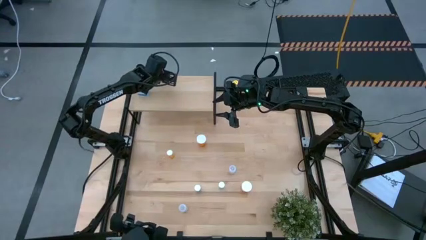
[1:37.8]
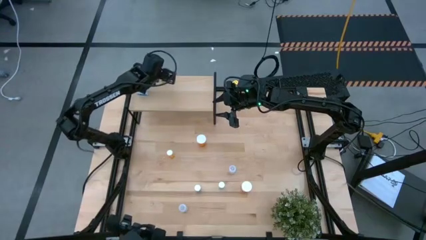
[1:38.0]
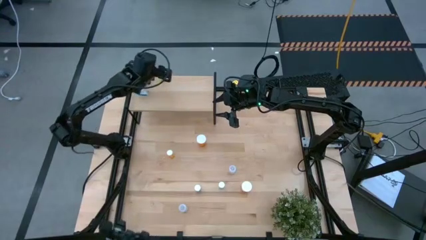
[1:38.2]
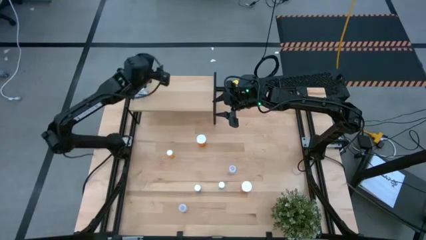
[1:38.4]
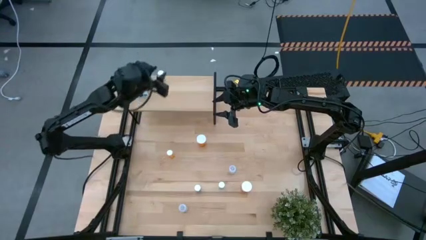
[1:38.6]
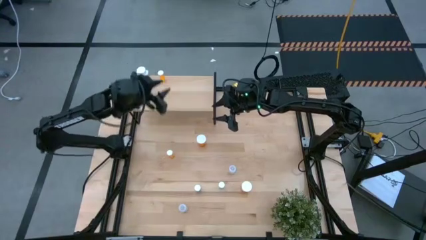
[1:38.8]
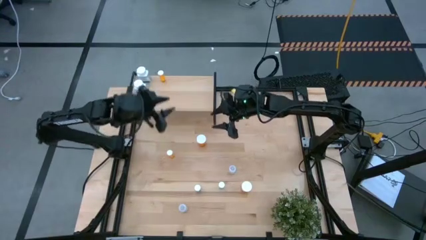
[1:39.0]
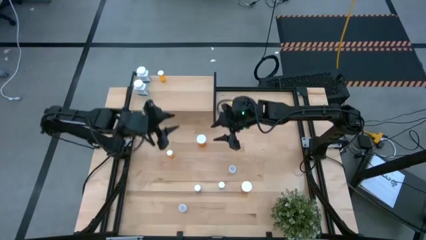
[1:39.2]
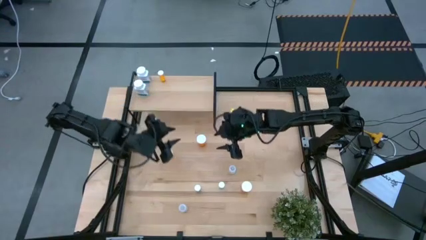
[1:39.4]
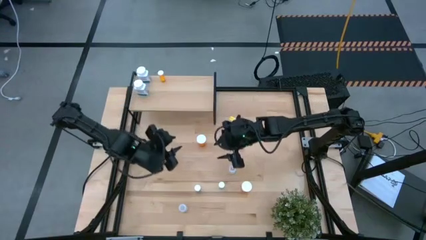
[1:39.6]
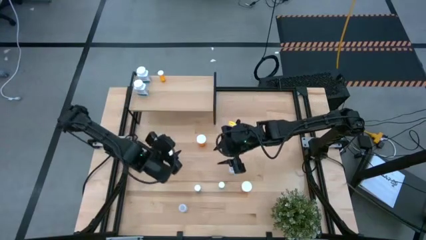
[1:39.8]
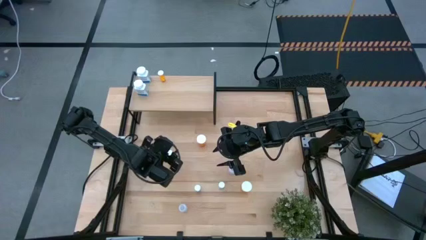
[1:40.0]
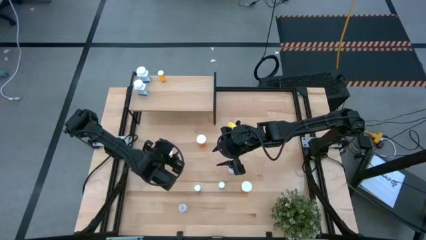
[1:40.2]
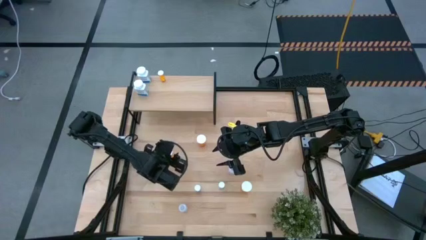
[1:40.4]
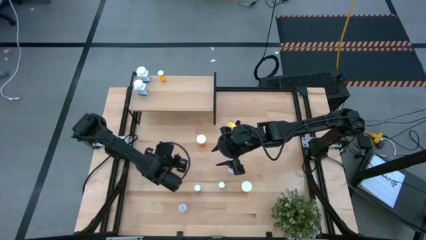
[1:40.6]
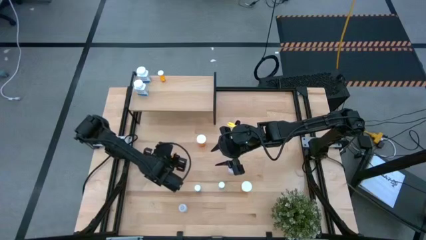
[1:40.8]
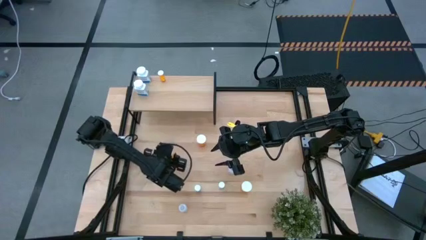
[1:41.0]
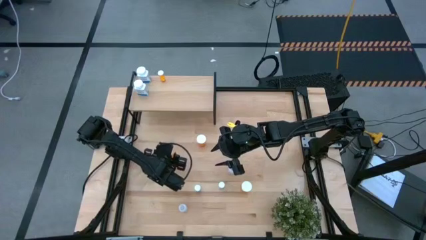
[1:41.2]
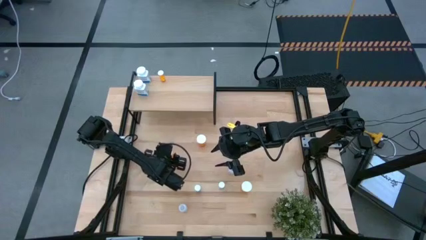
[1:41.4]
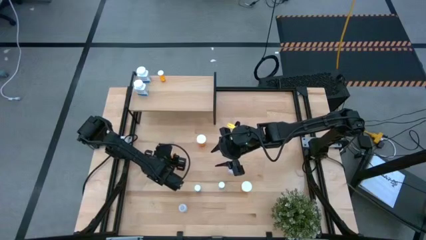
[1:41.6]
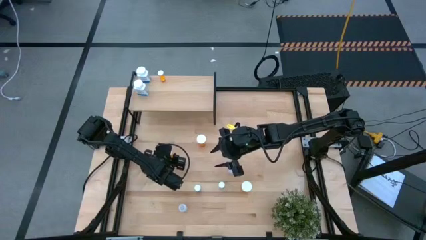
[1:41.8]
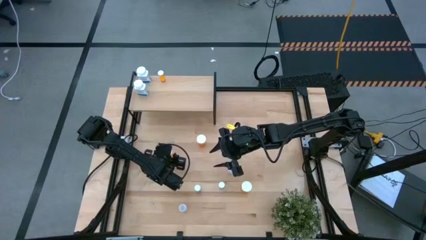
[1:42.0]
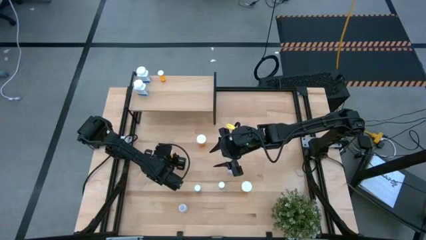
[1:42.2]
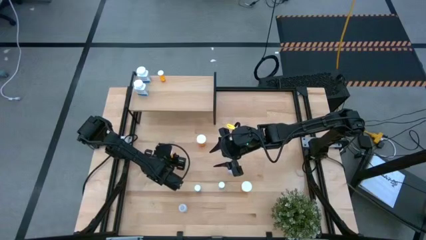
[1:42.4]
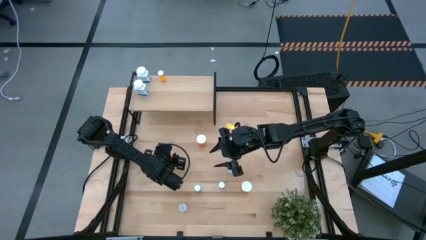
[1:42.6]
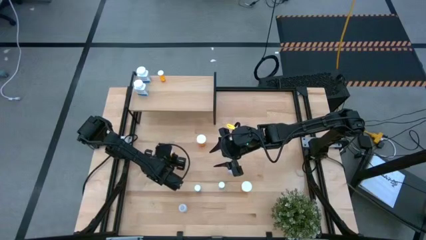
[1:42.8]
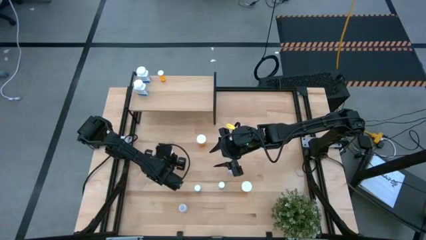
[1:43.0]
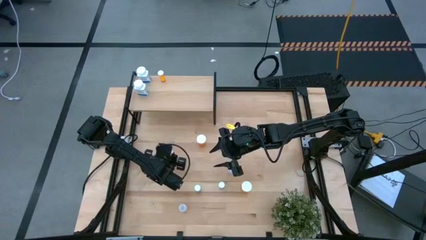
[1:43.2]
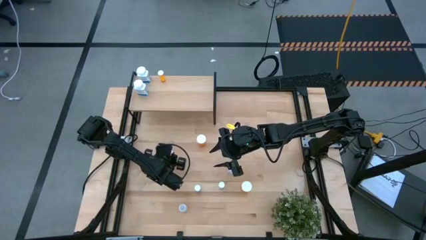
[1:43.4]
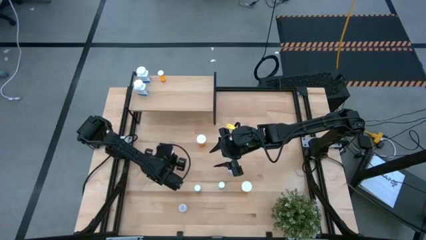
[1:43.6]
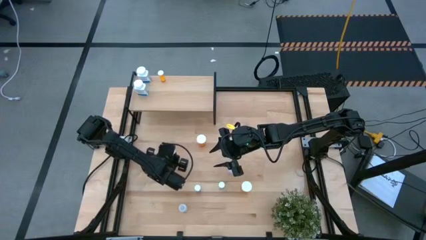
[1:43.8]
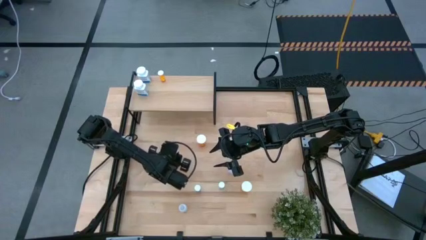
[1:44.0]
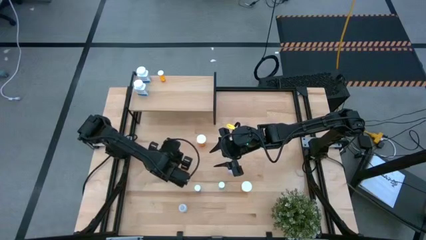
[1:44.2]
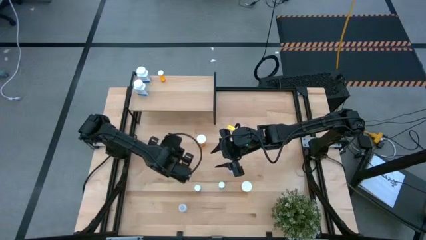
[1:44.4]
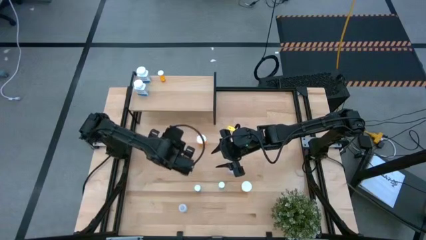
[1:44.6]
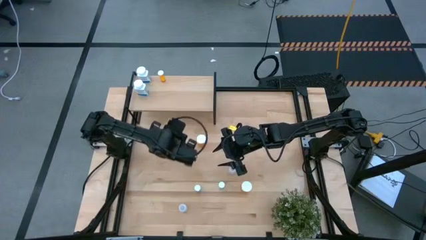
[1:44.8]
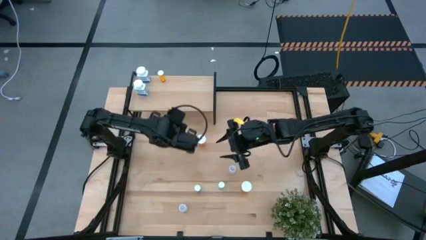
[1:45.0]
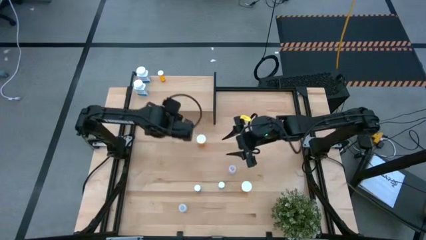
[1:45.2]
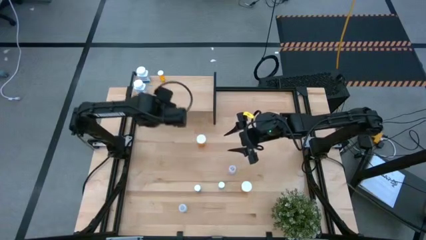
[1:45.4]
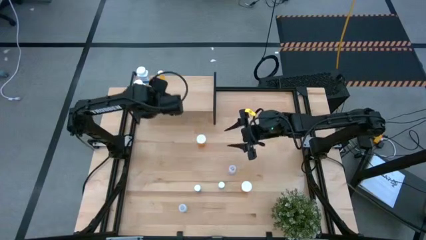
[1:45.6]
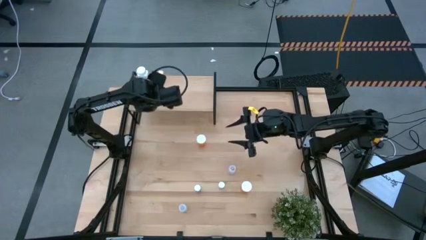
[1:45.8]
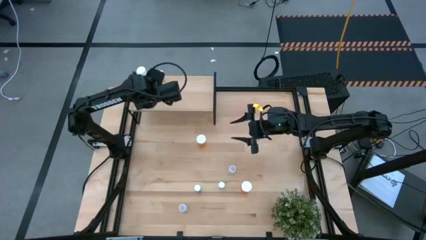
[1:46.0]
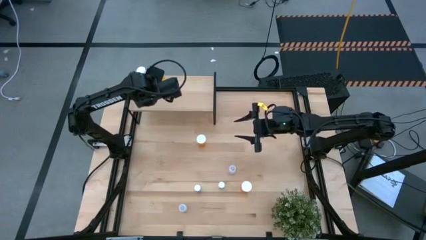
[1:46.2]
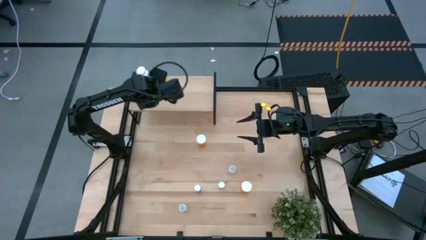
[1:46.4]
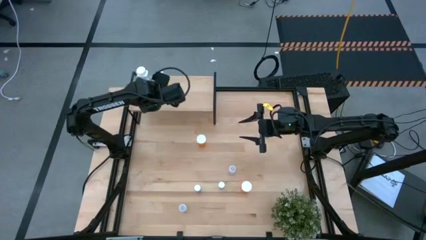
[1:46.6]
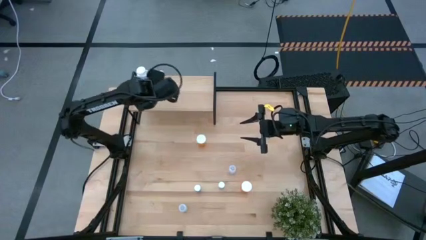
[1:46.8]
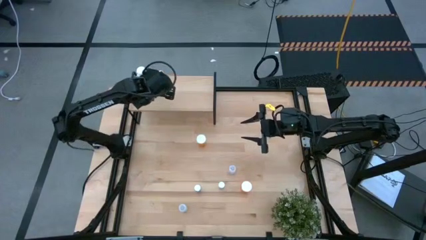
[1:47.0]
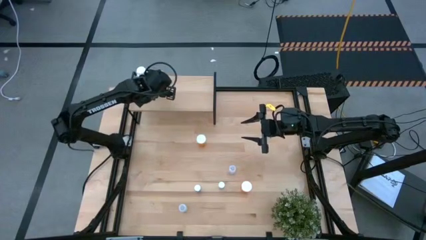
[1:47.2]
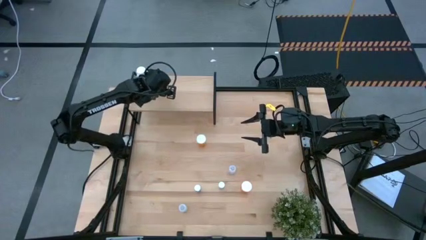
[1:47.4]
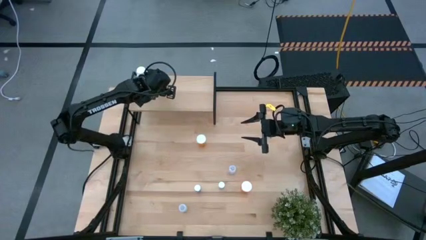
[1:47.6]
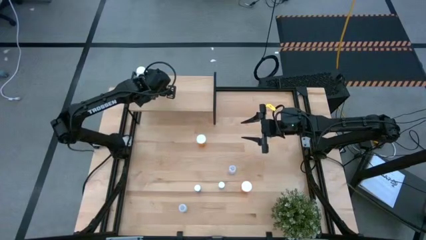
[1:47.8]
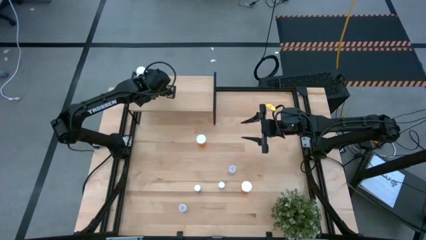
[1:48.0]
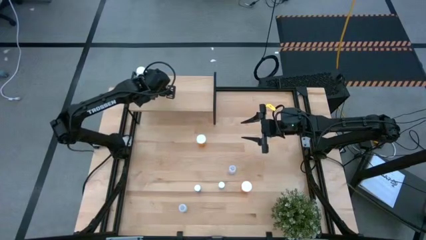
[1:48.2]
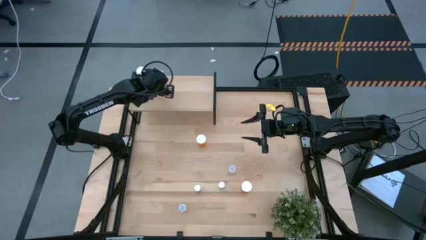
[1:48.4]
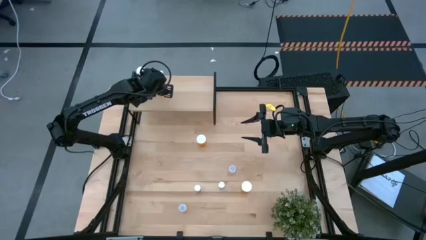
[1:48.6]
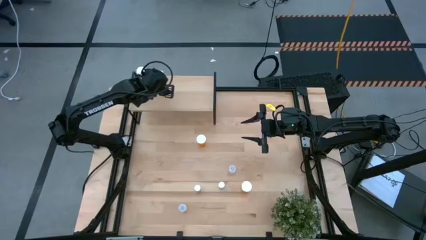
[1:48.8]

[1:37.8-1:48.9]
Task: Pick and place medicine bottles onto shelf by color
Put the small orange pill bottle on the shelf aligned with the other small orange pill bottle

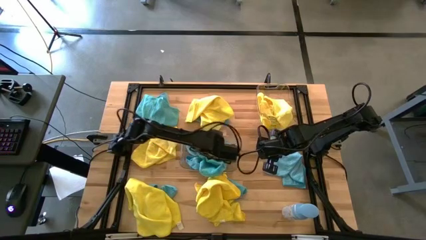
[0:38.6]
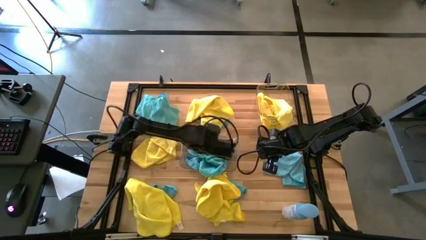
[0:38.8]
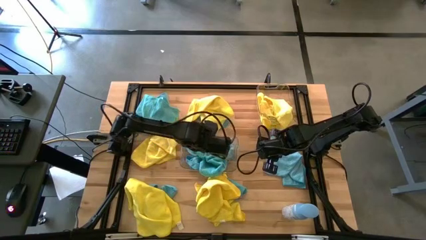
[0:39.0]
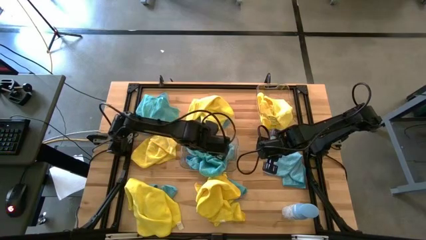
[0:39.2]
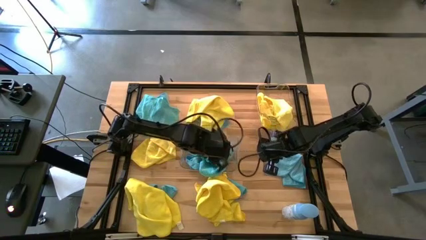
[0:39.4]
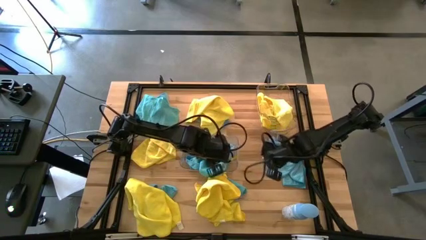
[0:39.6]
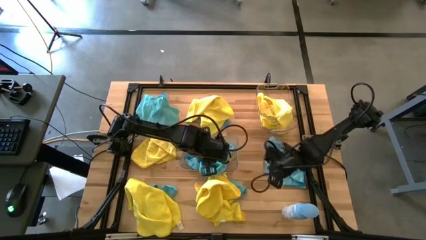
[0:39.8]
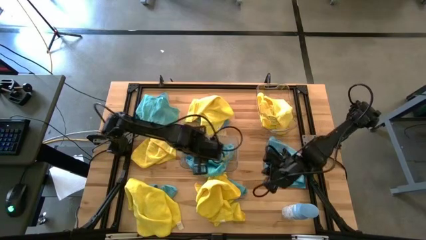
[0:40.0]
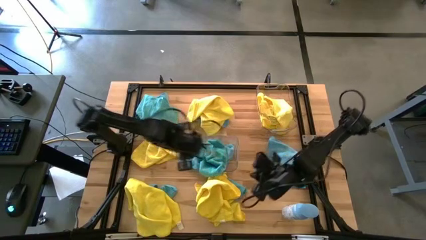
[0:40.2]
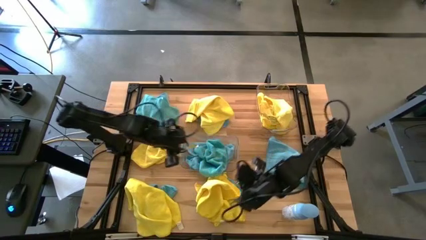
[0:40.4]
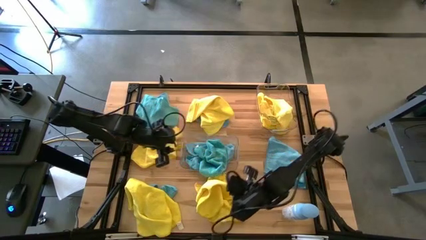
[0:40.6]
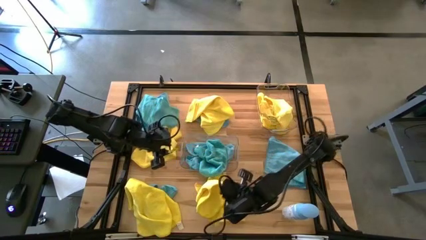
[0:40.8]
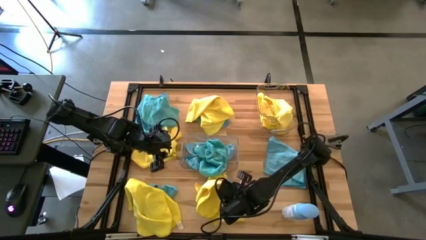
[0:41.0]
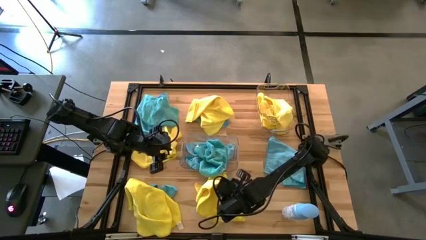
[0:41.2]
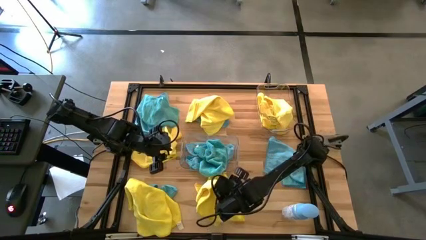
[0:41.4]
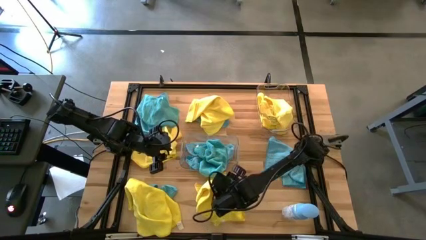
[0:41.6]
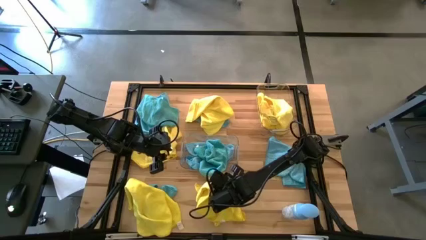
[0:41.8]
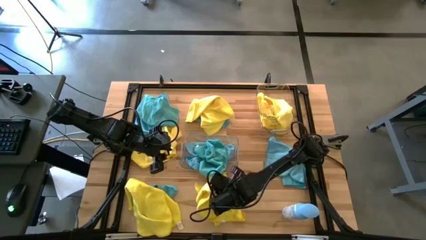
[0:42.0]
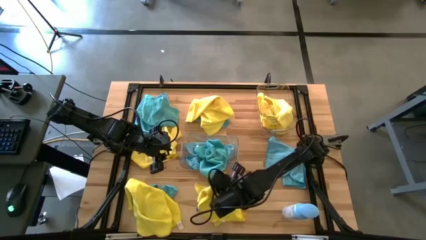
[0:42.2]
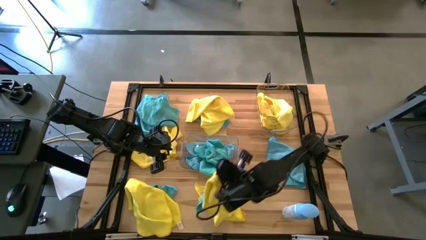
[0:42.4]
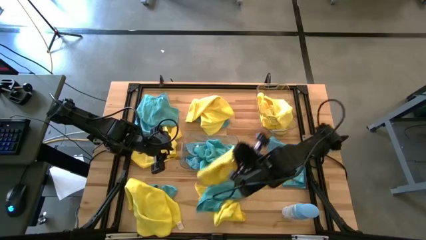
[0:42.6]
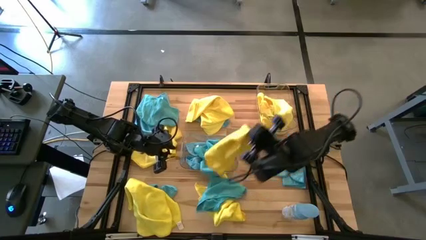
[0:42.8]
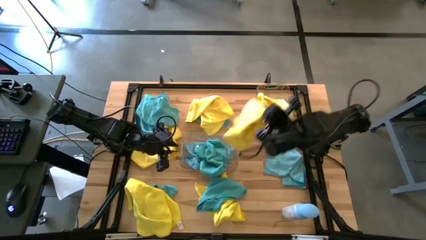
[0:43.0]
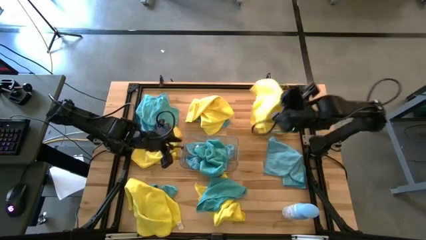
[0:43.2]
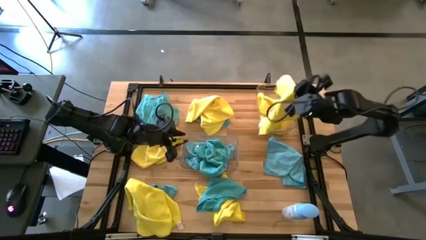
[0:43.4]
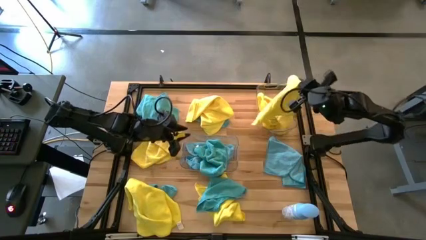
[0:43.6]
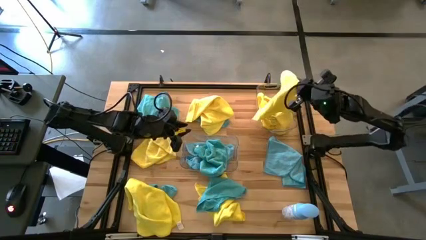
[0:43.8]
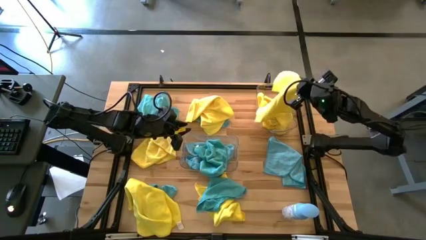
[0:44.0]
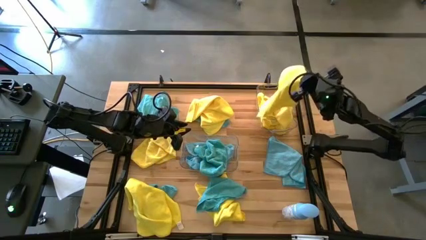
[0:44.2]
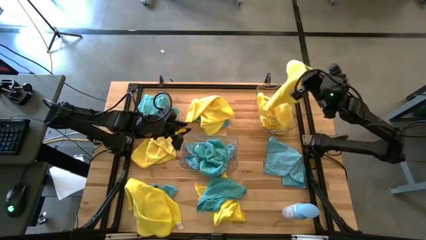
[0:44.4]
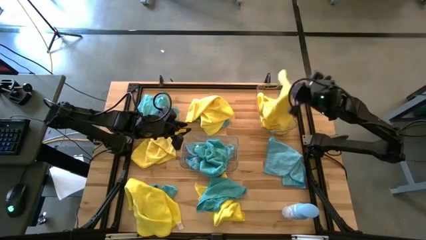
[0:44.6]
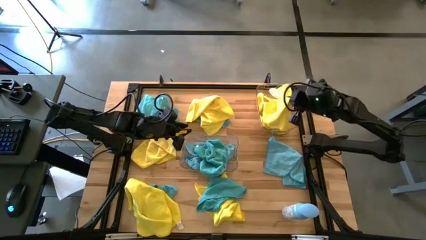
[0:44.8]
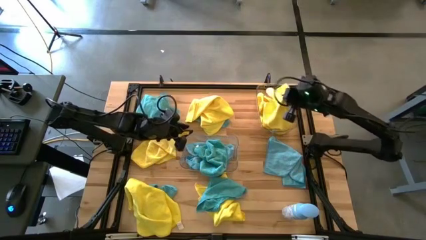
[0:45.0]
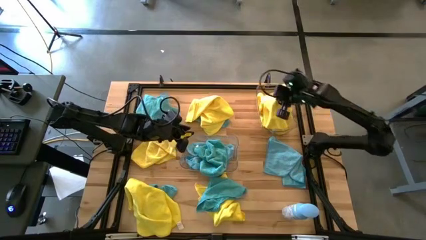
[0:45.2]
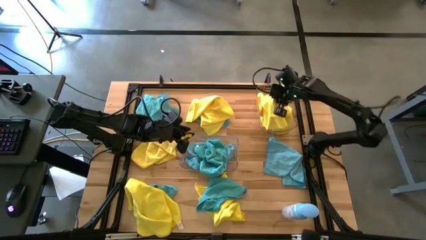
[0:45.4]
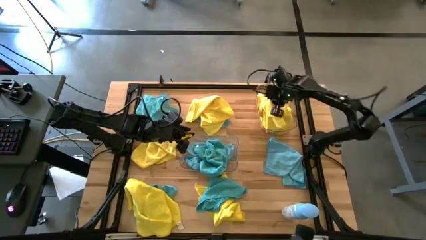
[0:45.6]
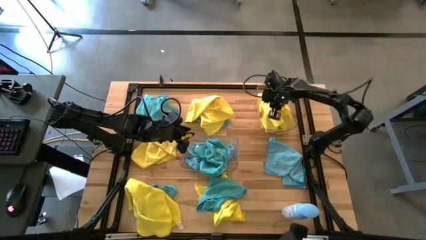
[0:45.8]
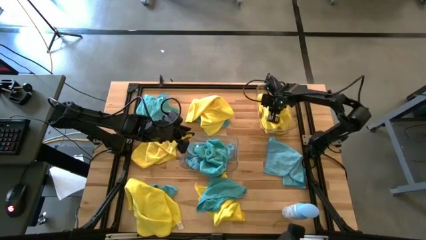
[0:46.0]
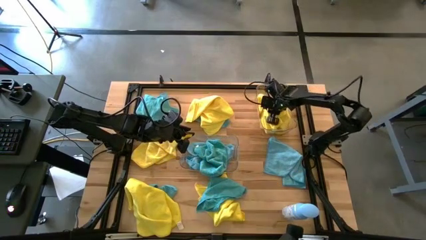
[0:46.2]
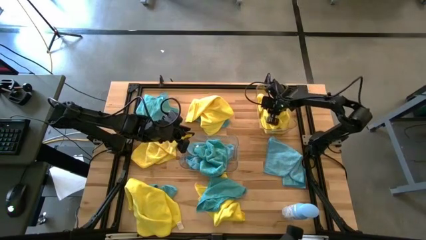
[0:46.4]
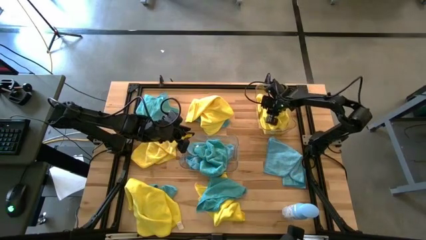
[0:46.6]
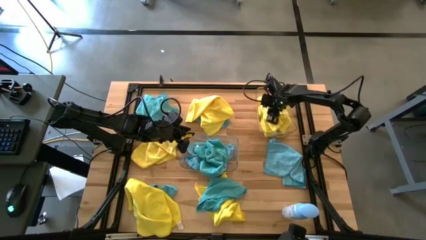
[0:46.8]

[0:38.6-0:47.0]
Task: Sort microfiber towel by color & place in baskets
Put the yellow towel into the top transparent bin
